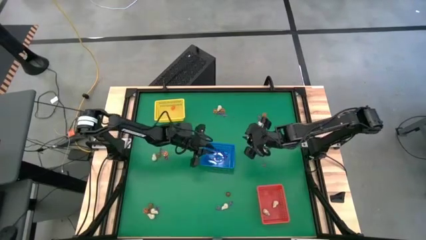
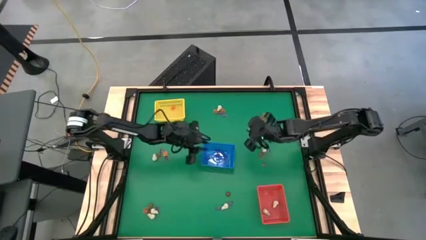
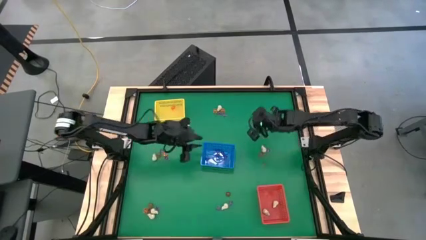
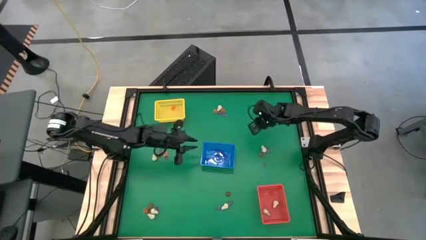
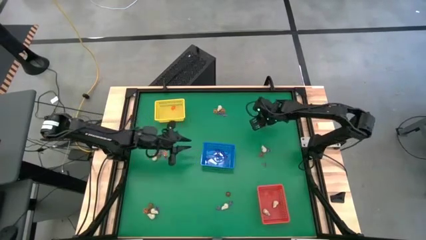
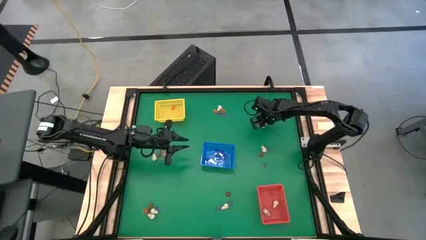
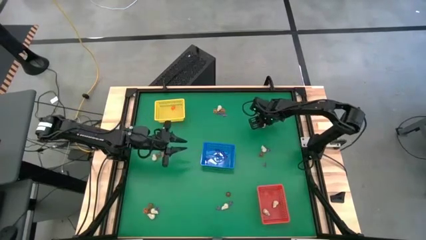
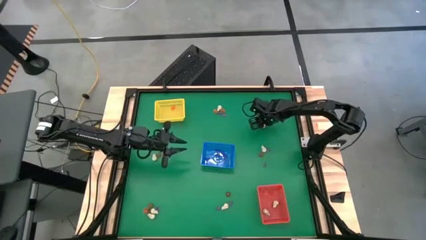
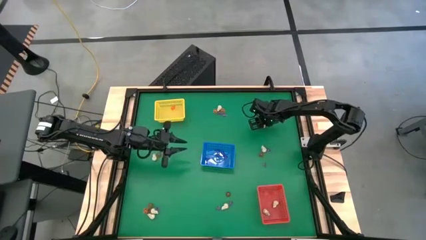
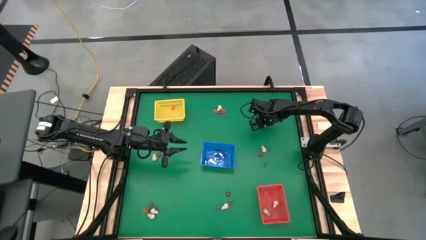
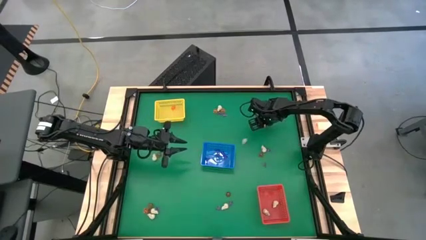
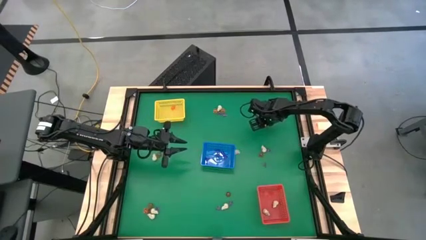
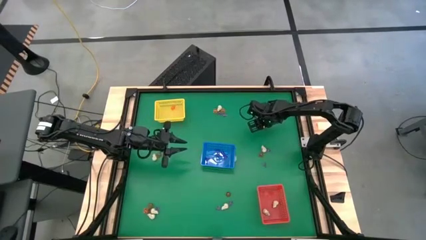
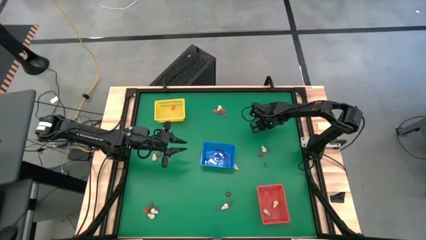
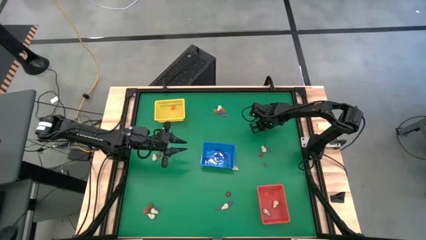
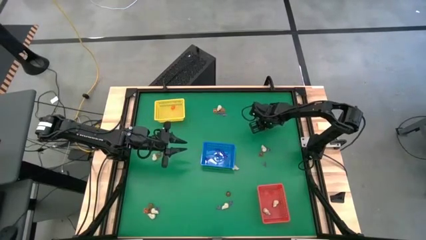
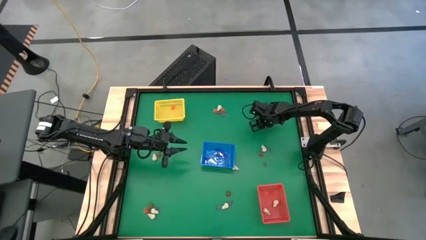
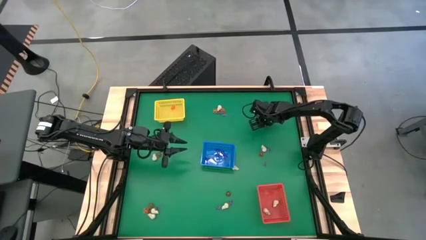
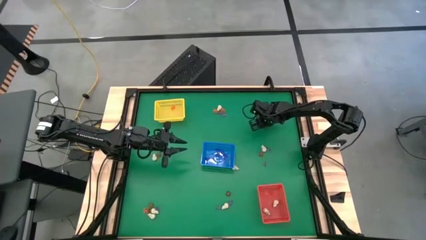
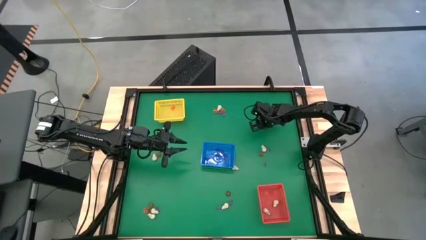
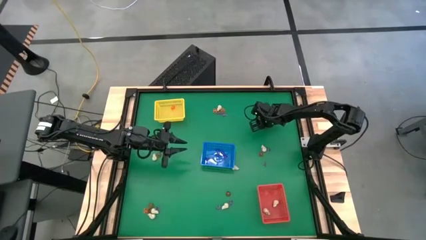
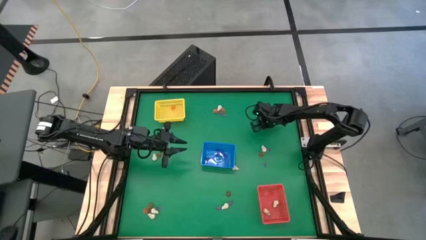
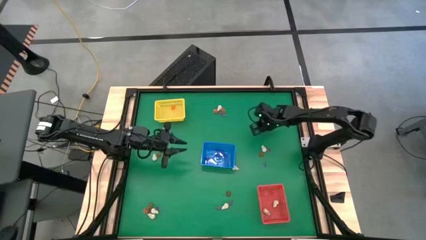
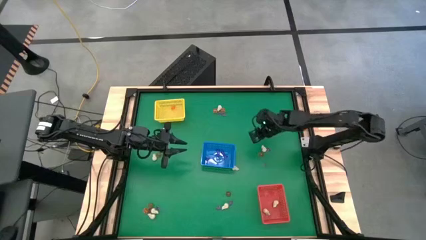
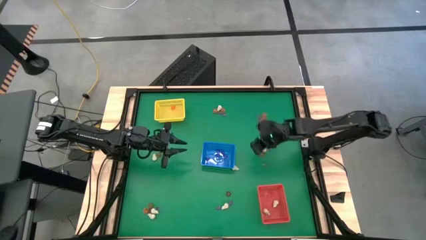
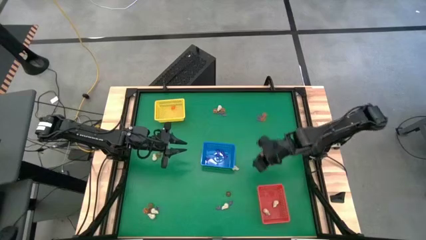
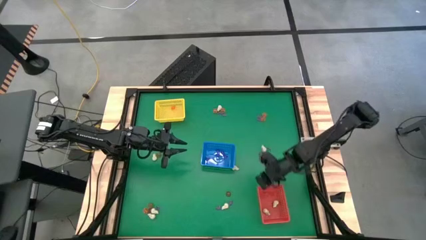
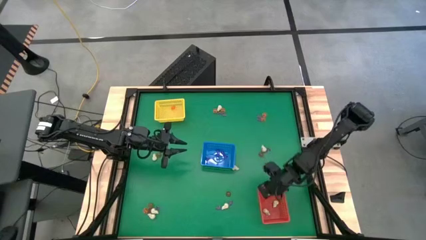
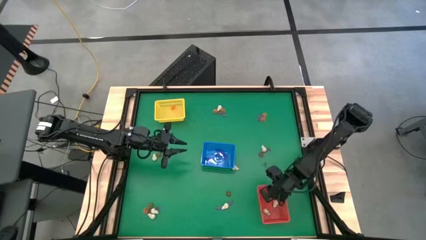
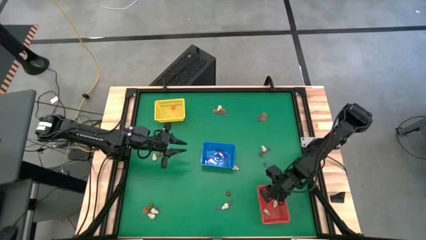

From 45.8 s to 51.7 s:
Task: Sort Halloween decoration
Put the skull toy into the red bin

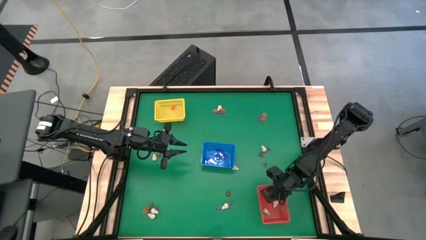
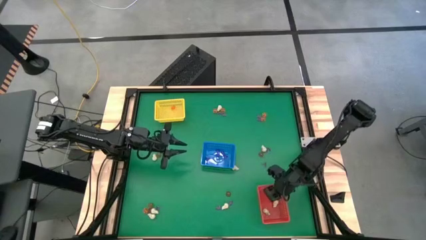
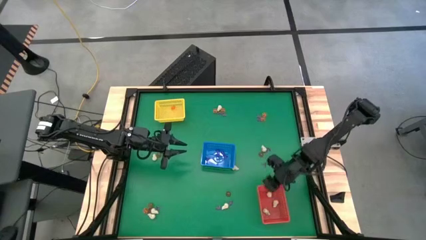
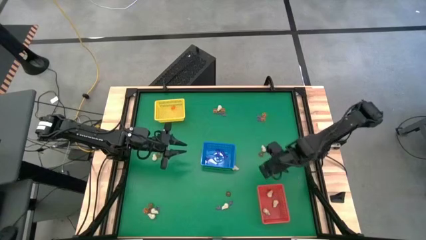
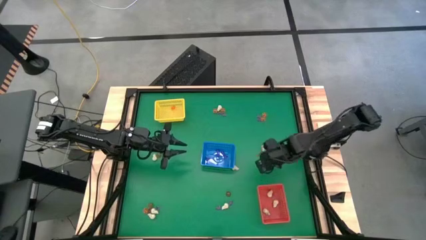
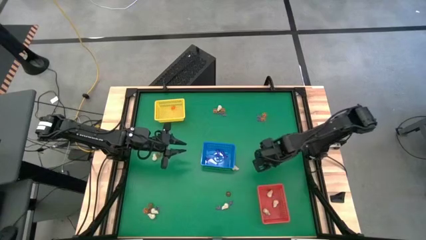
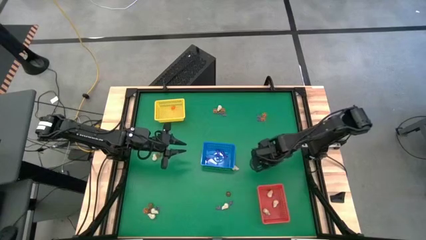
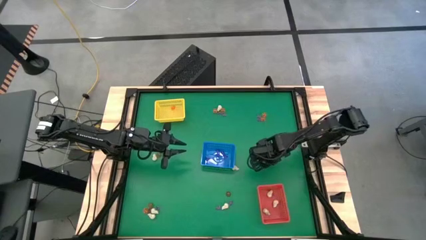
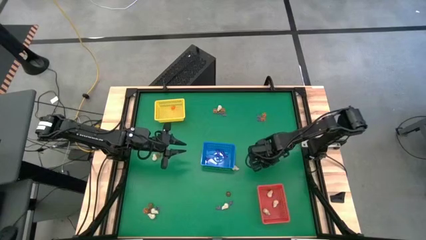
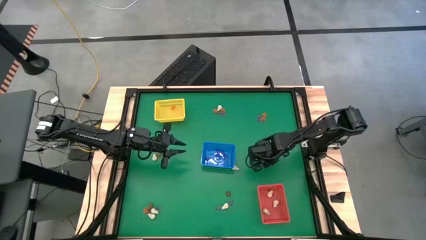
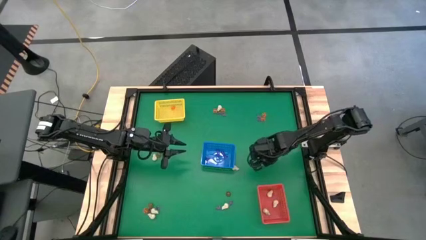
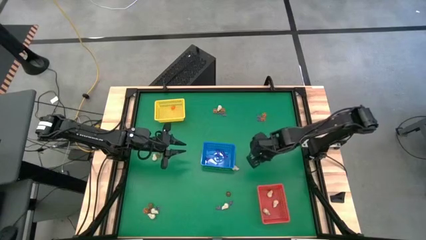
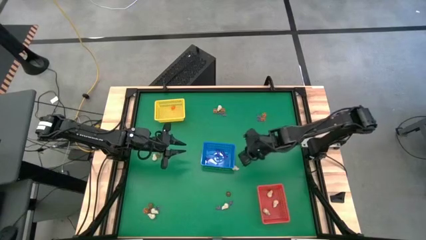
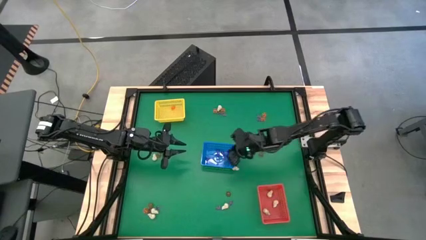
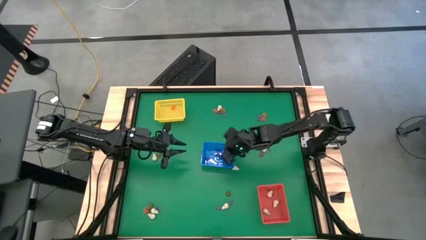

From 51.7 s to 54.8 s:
Put the witch hat toy into the blue bin

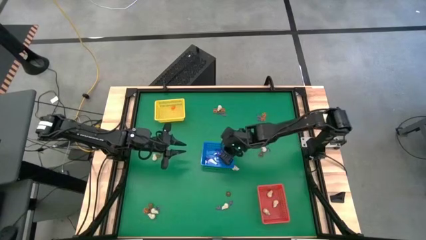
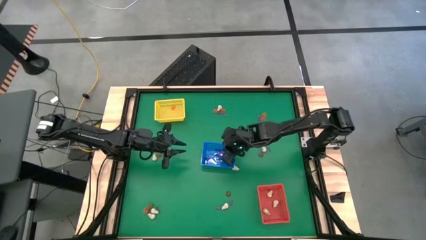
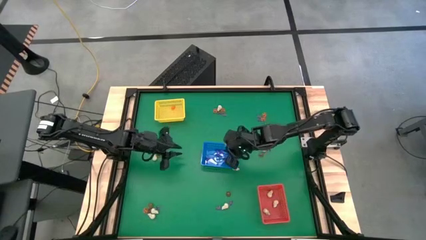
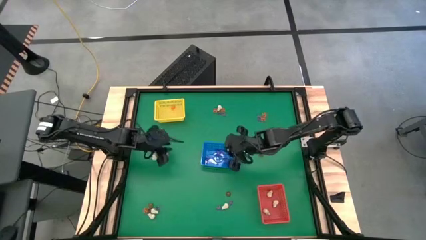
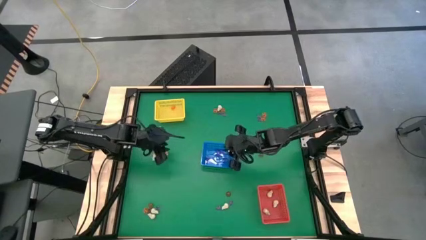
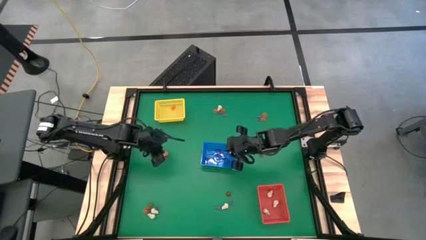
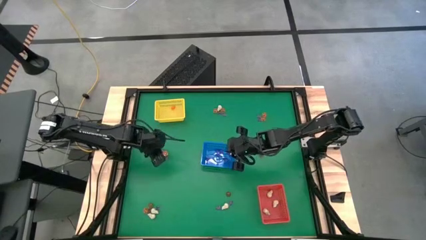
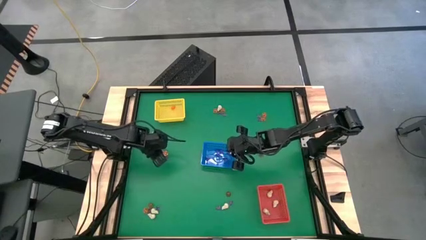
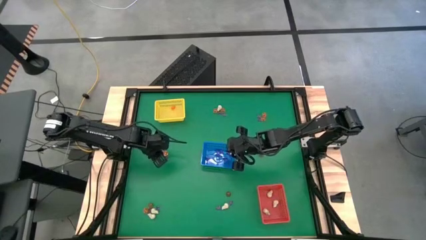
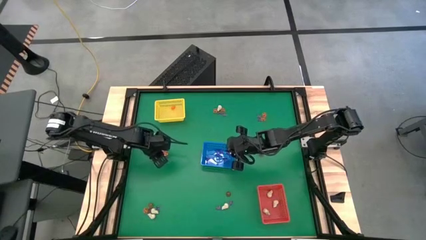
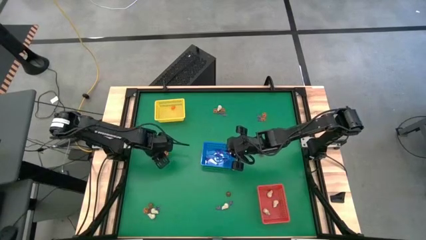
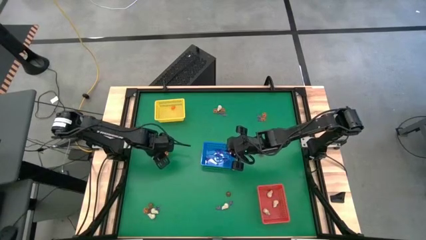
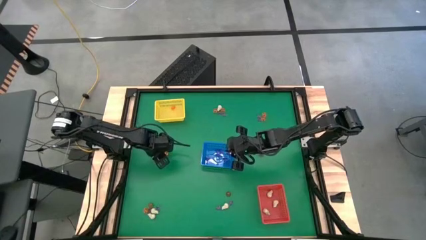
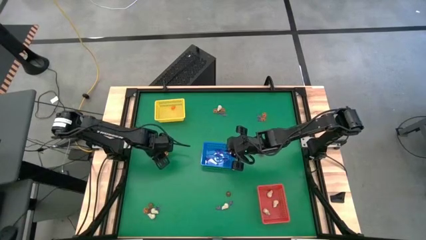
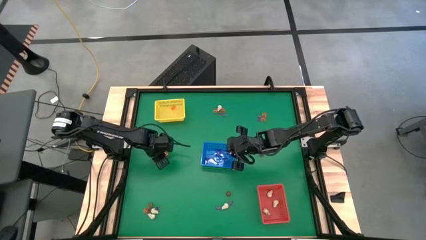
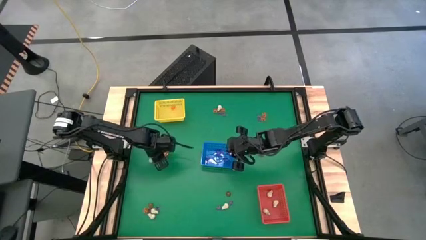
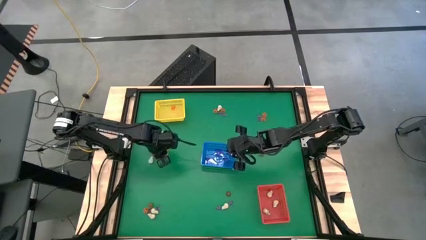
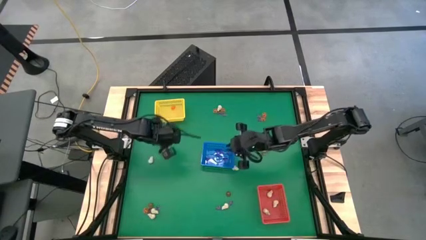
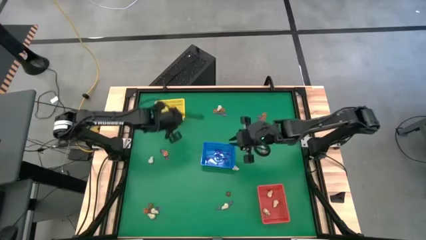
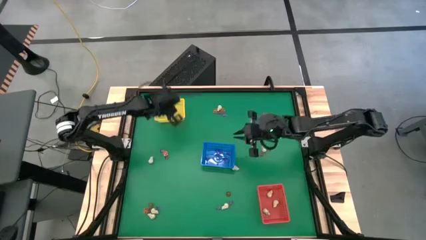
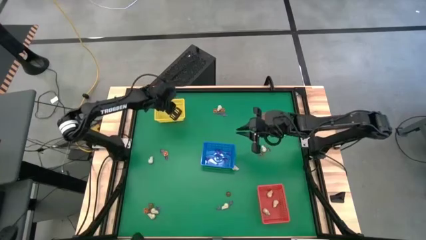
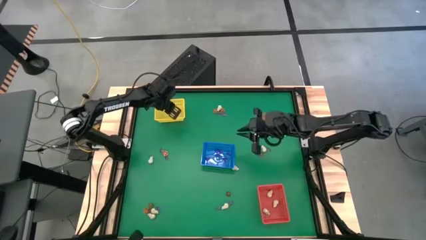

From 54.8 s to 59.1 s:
Put the pumpkin toy into the yellow bin

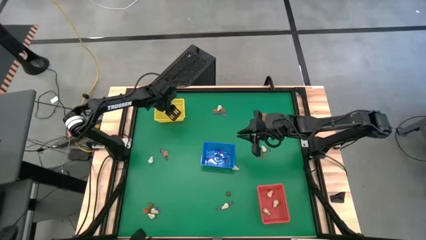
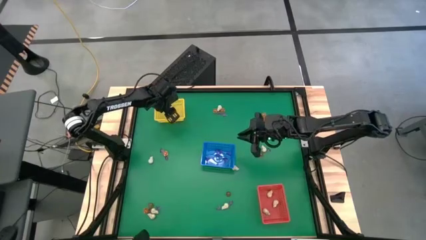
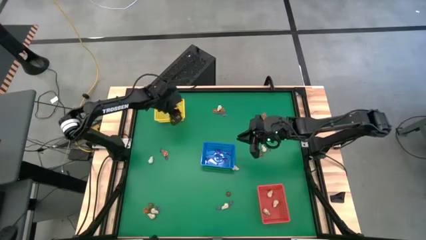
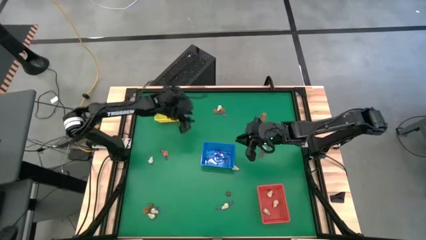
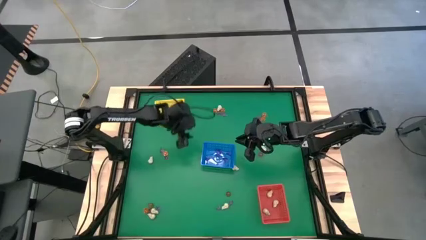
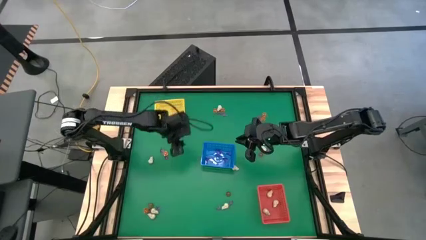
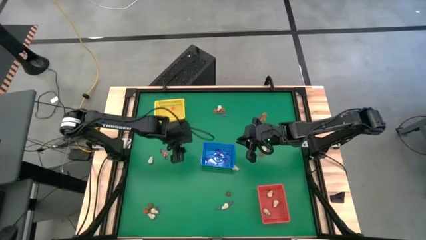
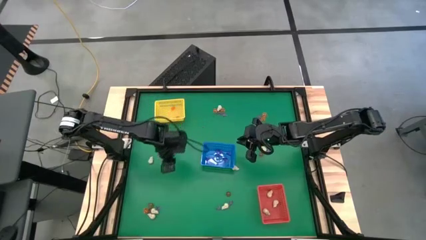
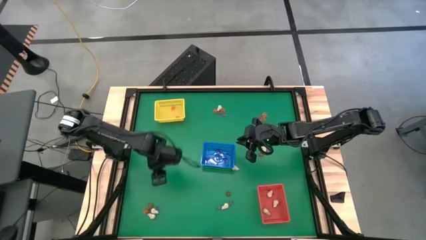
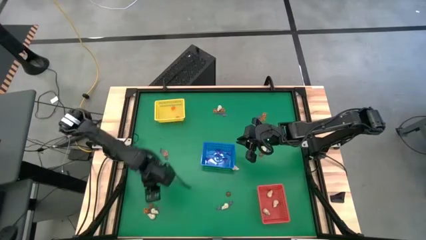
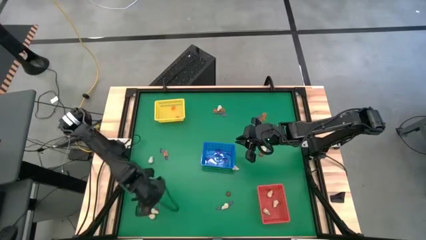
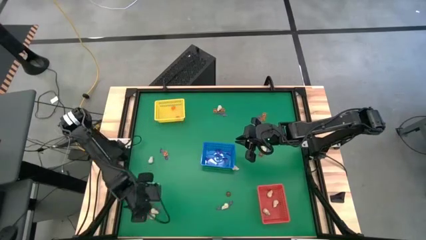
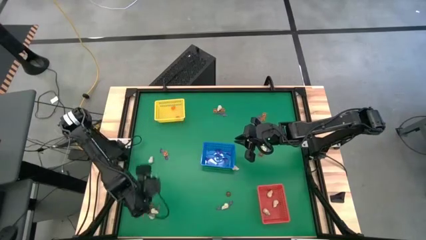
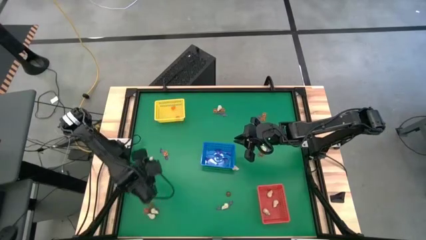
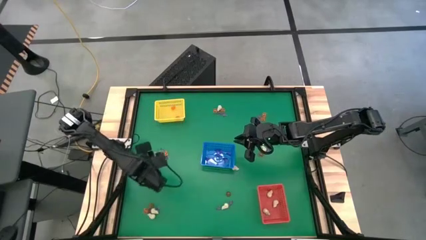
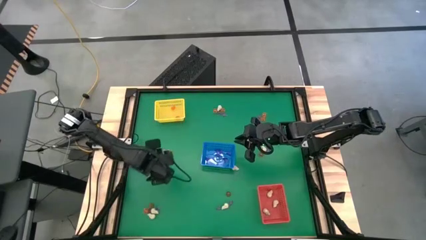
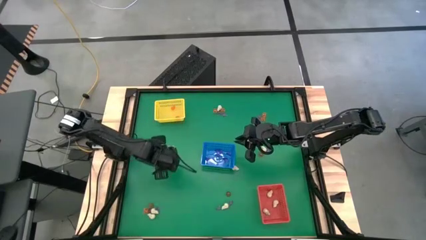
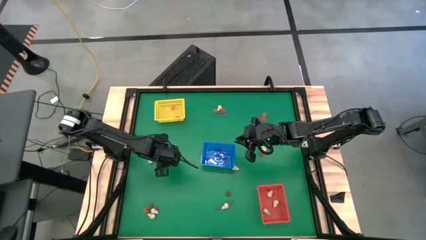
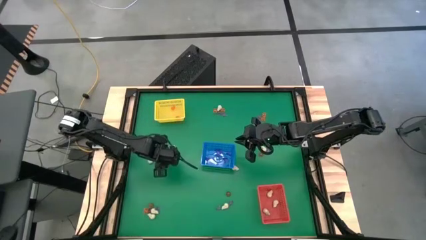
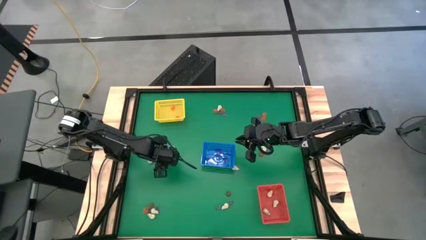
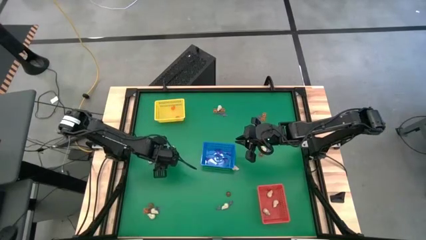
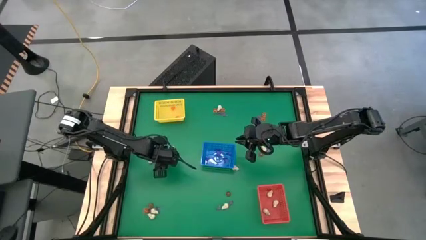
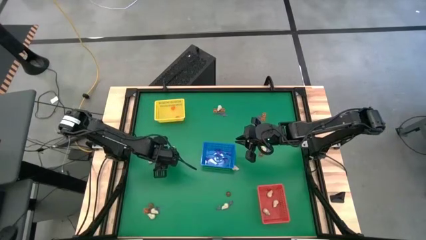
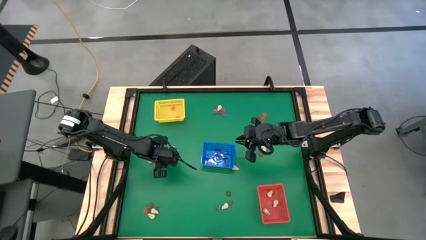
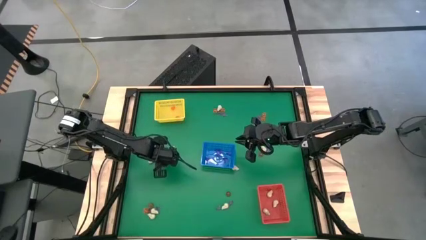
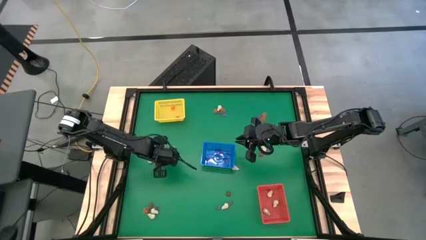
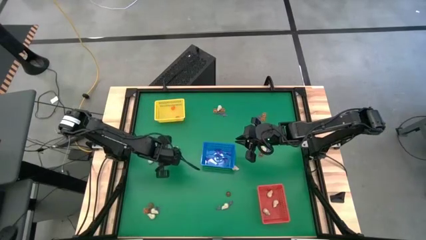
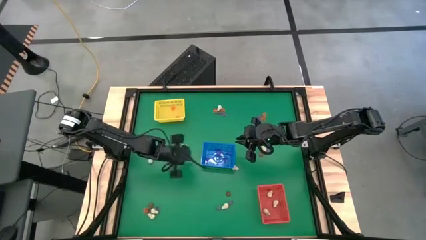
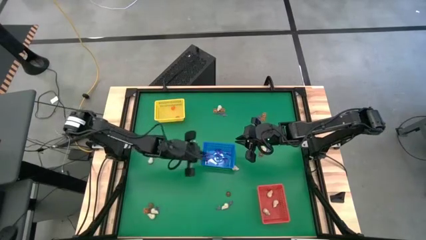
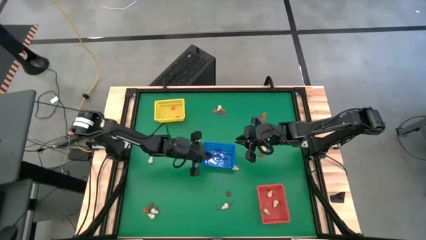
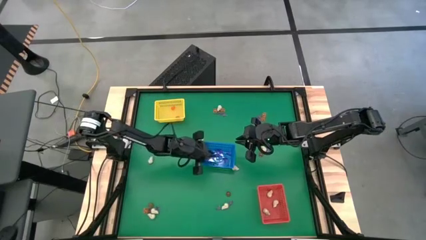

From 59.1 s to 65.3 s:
Put the witch hat toy into the blue bin
